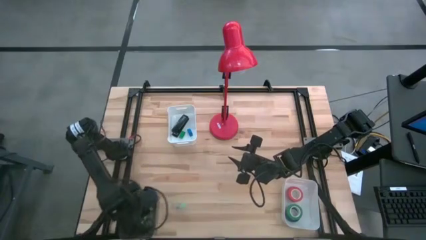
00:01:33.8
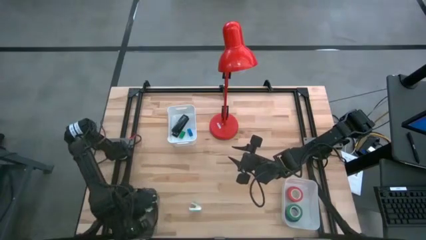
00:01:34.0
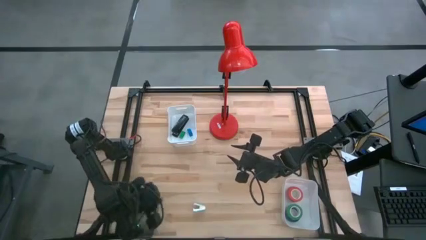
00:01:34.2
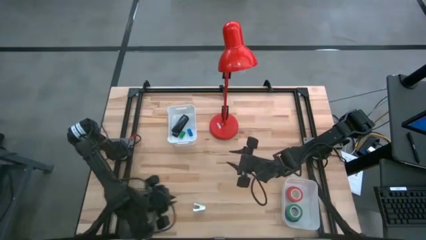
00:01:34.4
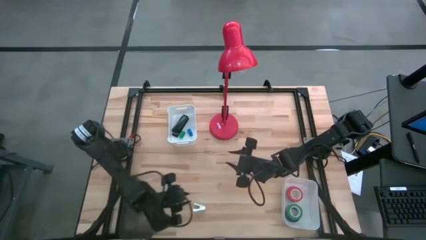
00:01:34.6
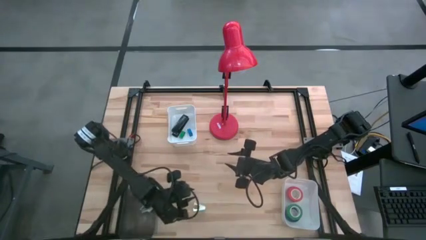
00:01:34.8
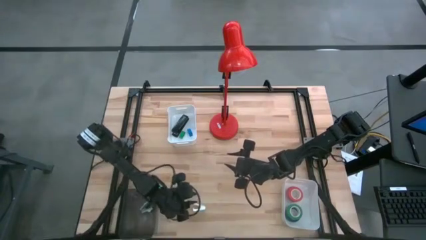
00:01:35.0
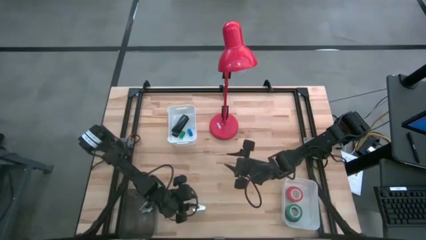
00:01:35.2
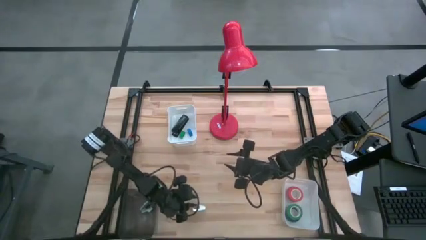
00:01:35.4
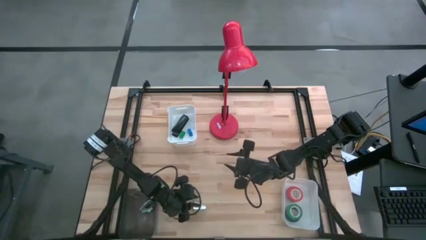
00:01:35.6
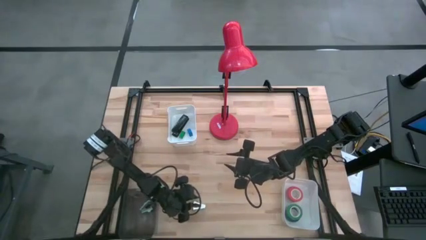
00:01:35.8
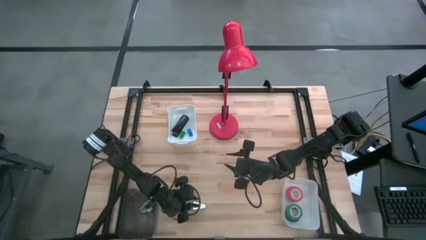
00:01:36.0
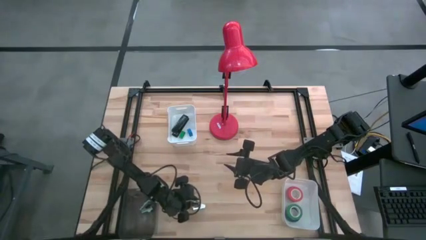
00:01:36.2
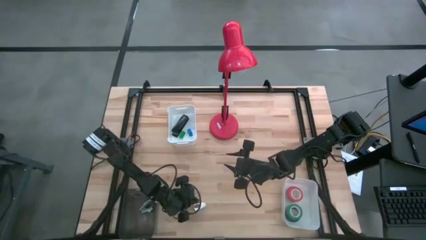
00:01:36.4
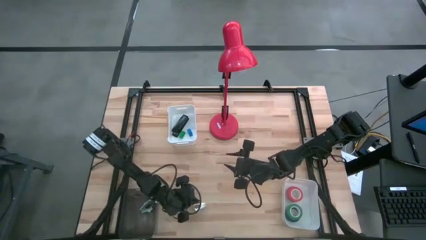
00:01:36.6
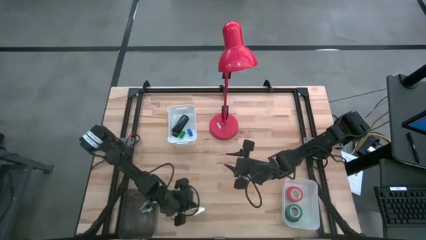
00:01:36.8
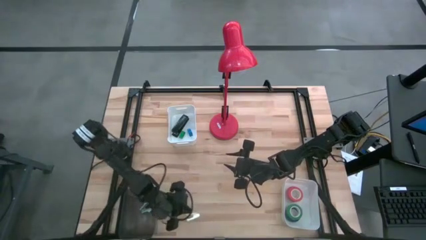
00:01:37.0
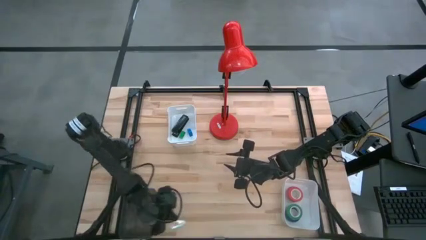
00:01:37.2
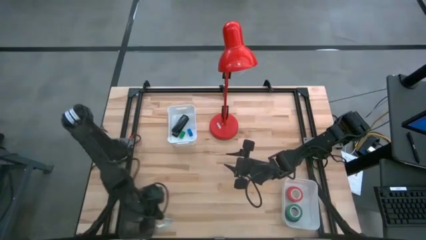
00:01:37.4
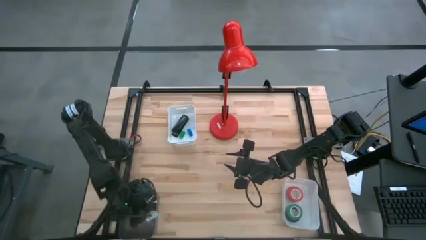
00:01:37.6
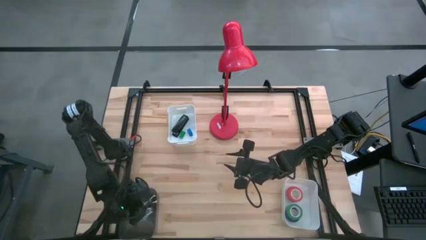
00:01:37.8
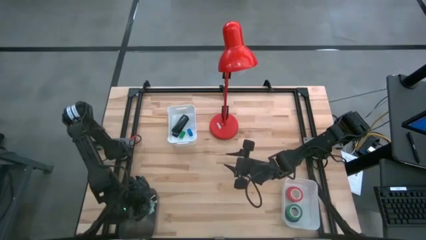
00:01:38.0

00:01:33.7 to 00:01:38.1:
Task: Pick and place Stapler, Stapler remover, tape
Put the blue staple remover into the black bin

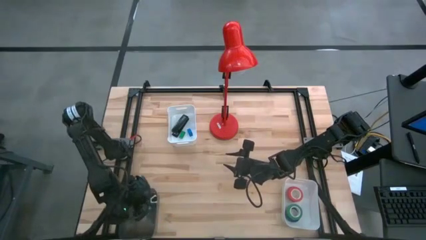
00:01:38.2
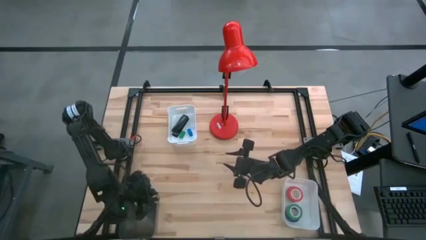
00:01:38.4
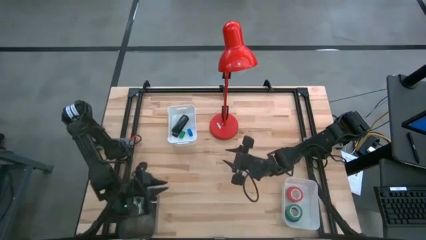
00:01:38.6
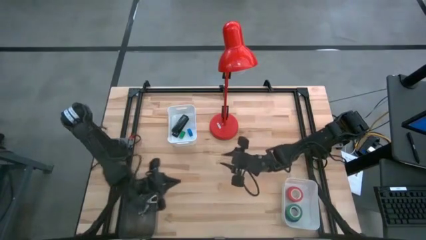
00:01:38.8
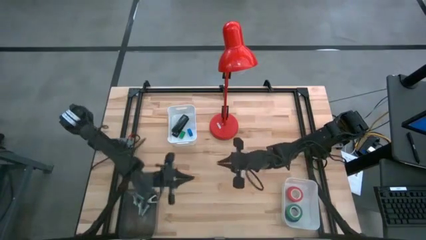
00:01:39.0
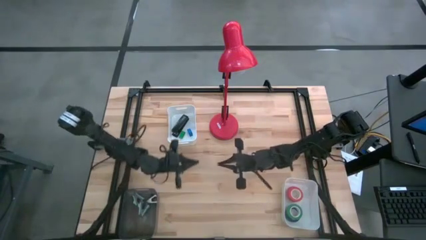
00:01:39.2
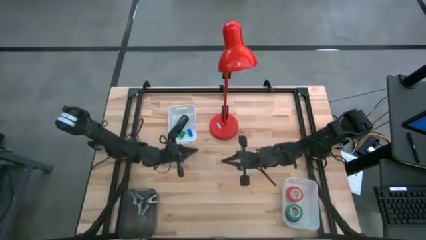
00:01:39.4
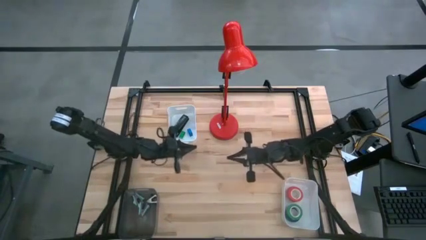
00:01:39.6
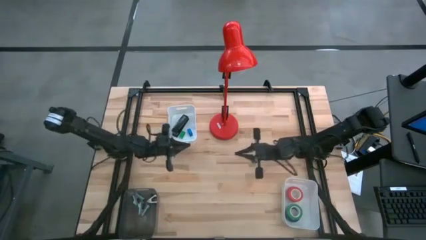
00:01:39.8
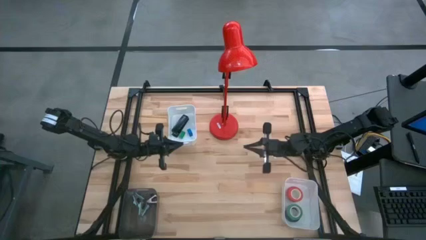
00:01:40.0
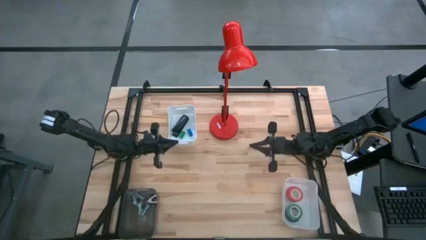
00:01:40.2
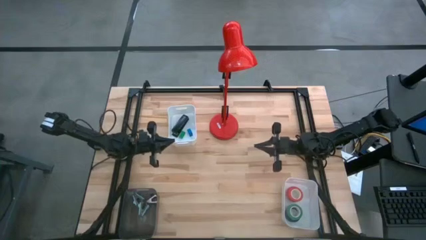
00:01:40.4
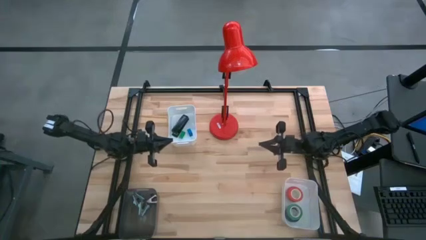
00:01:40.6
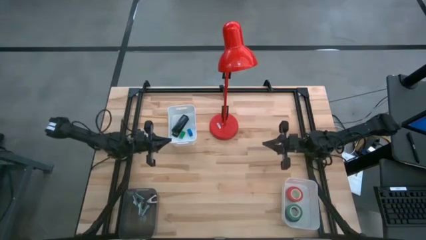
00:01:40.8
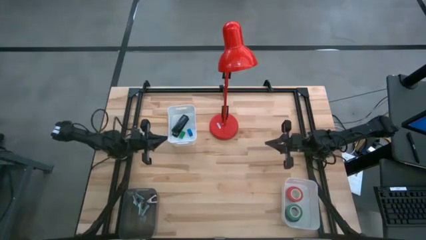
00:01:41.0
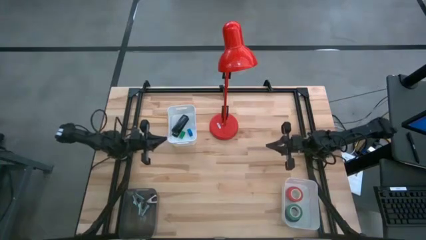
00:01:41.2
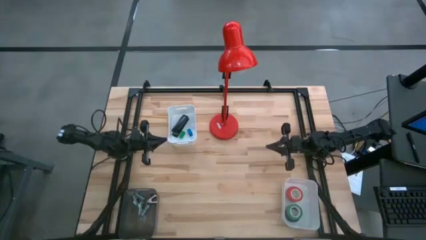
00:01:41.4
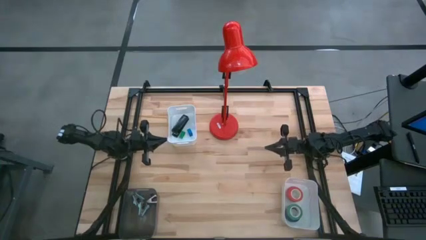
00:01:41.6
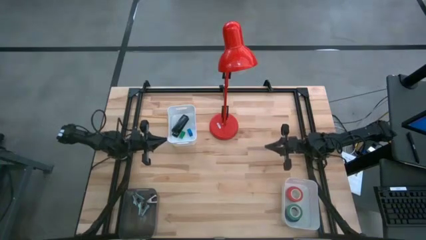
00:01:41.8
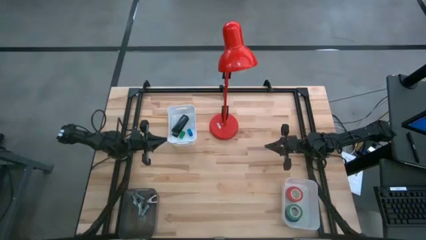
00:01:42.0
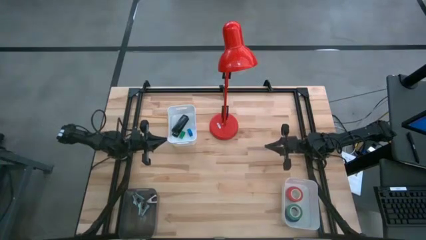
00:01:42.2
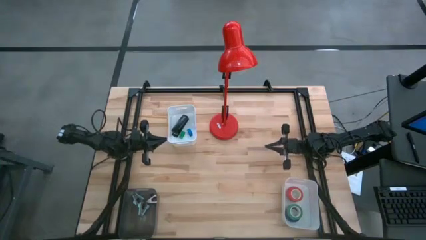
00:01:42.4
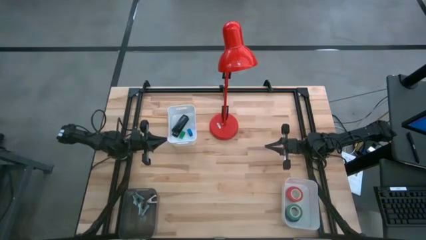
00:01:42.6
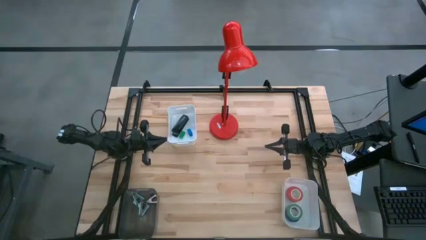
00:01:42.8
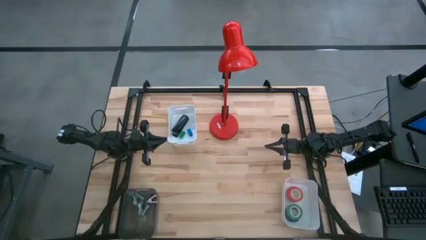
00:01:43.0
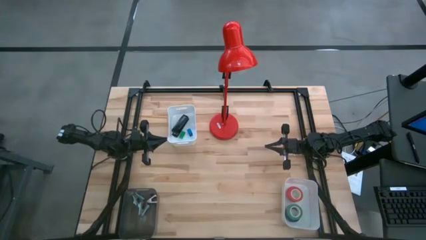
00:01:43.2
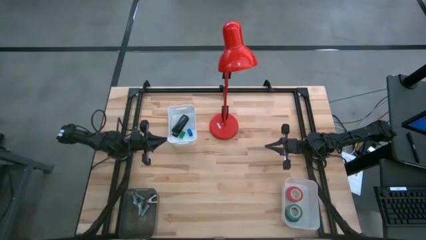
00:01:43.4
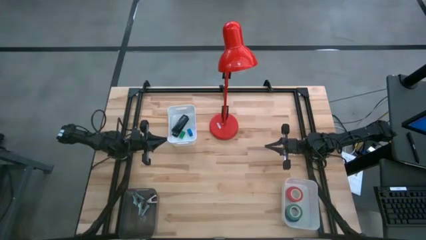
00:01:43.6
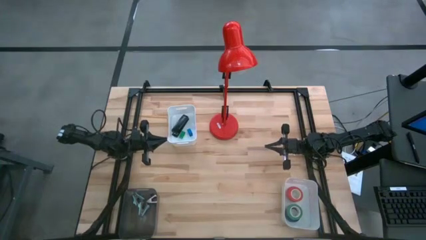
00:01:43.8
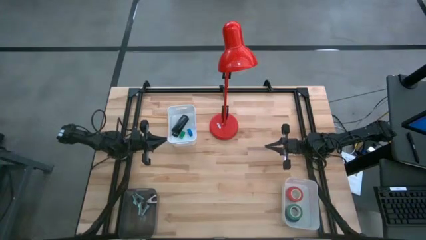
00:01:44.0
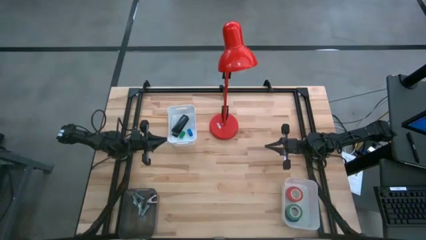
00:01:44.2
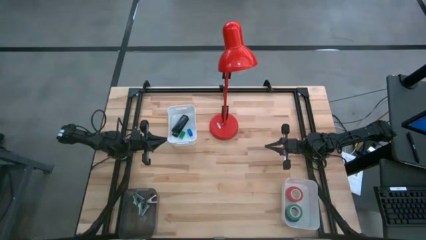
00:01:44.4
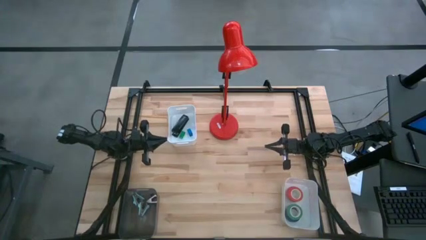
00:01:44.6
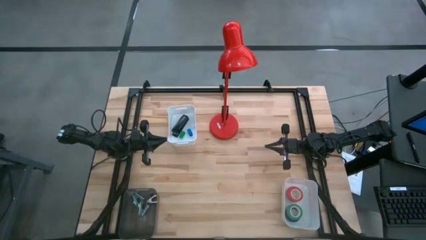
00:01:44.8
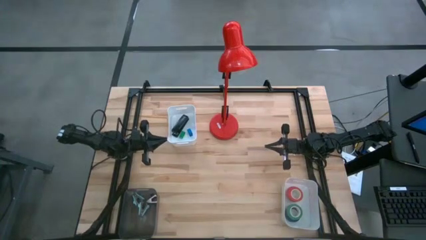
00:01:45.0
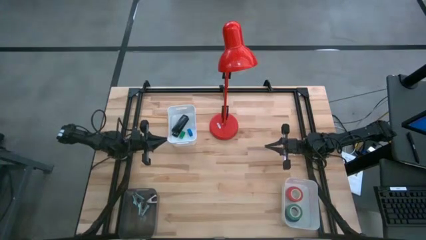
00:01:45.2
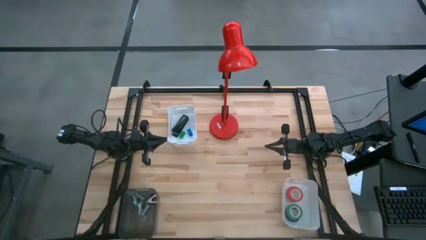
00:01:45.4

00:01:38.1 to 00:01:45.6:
Return to Home Position

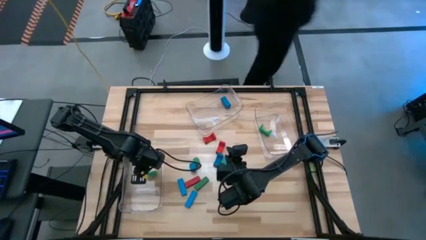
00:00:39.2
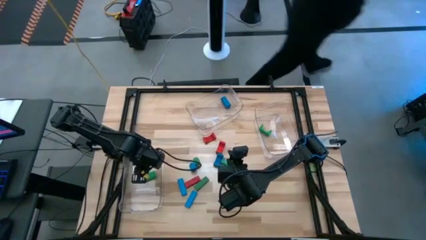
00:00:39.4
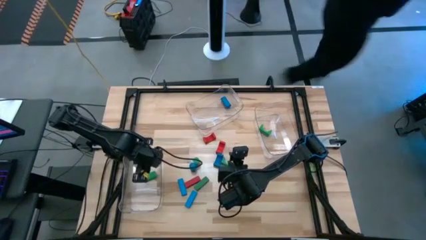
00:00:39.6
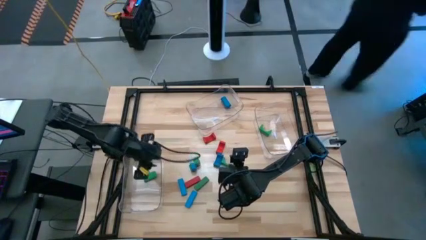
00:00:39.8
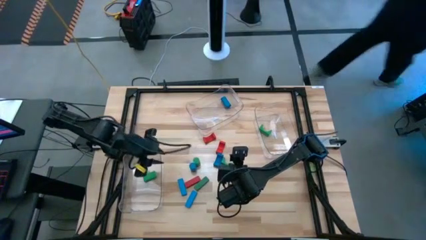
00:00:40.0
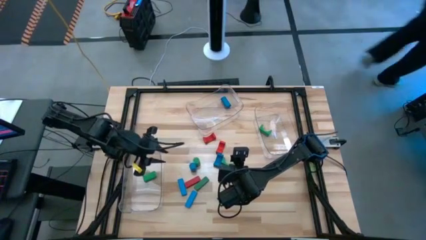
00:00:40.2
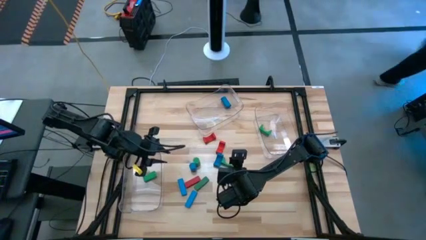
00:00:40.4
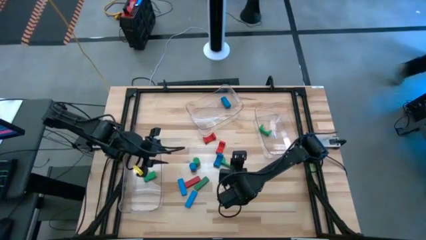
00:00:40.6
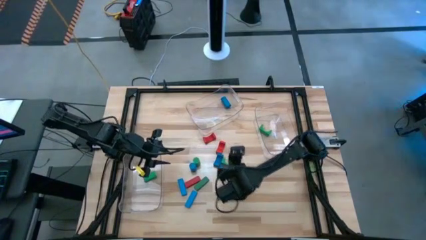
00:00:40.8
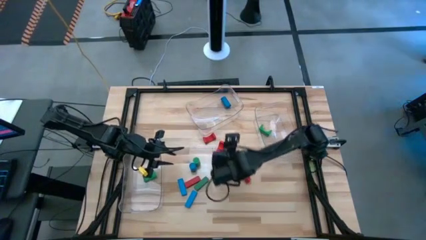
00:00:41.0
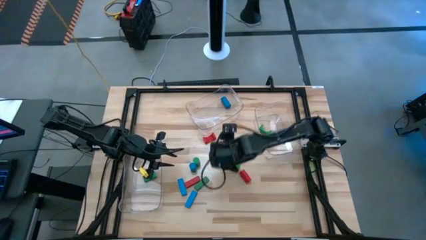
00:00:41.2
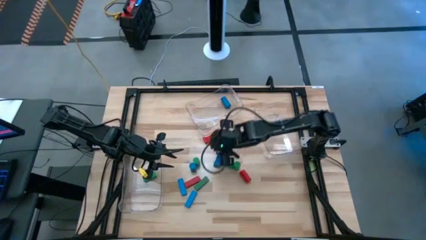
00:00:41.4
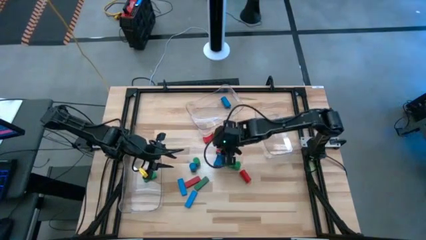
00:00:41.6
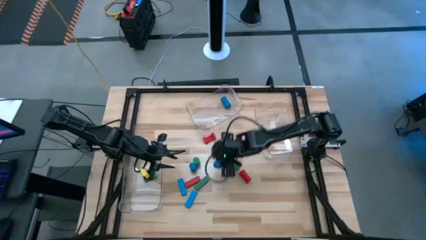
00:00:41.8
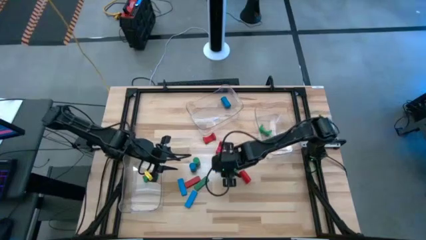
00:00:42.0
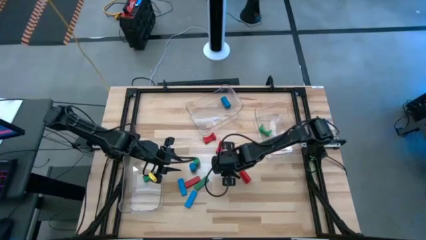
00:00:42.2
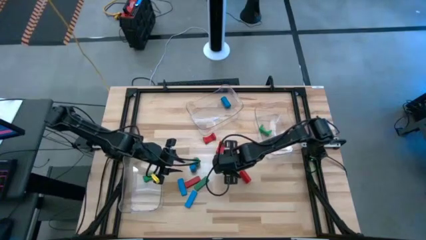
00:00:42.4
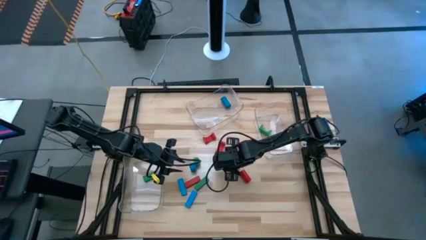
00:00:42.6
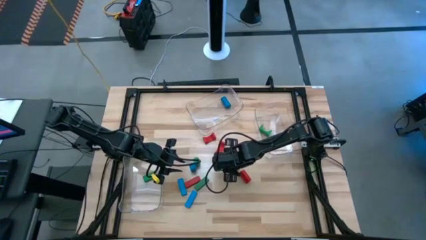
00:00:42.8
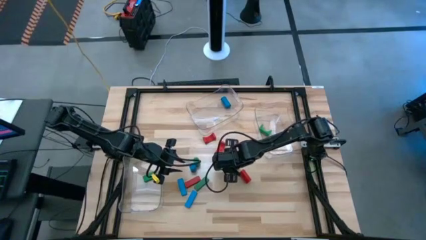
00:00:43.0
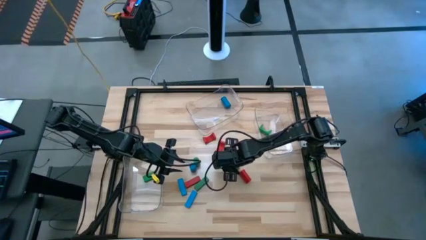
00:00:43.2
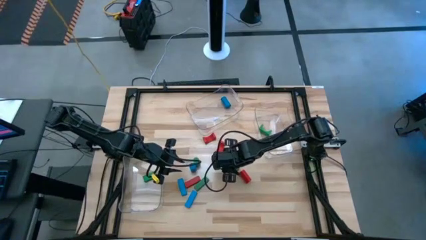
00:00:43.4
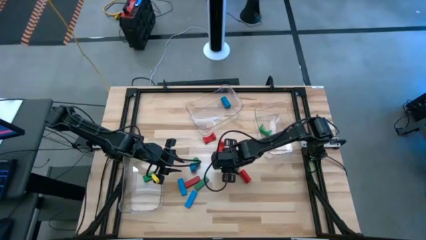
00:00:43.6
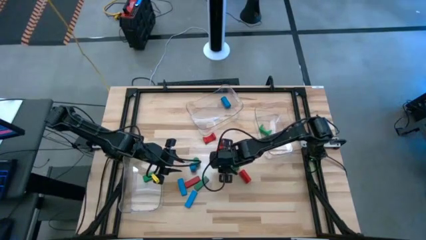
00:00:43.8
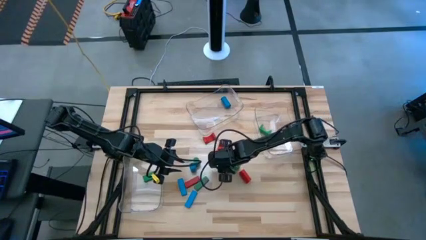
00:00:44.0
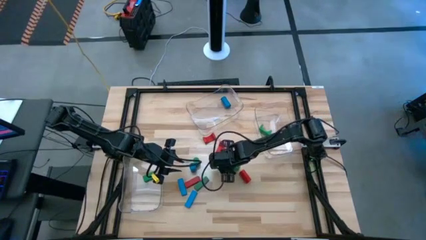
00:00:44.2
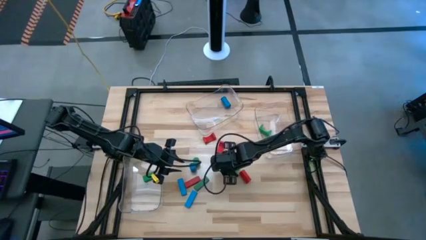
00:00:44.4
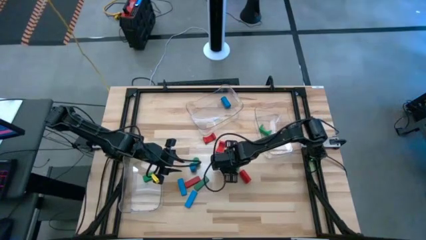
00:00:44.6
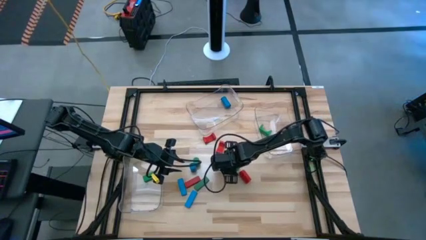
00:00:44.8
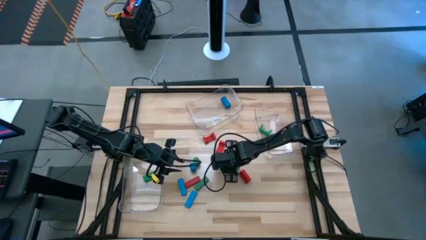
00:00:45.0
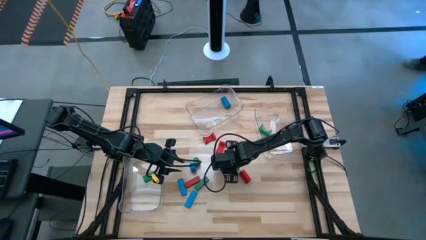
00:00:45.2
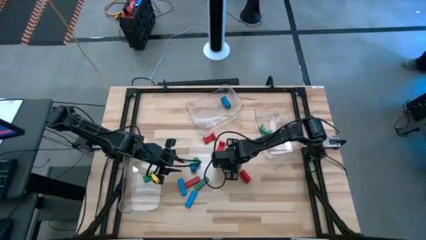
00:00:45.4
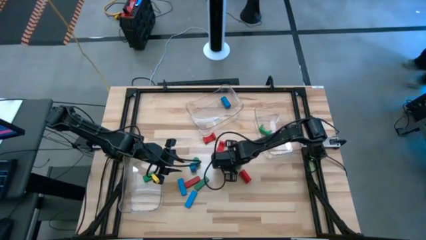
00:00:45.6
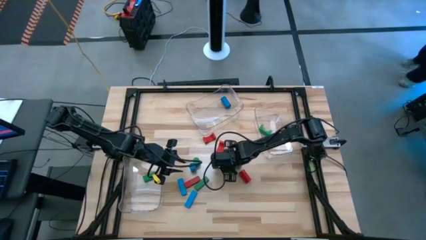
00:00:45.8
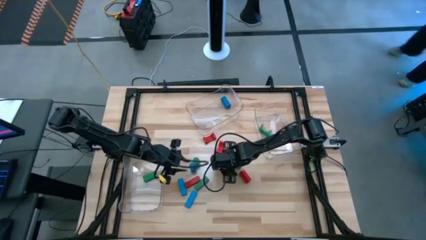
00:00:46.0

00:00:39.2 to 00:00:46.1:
Task: Sort blocks by size
Put the green arch block into the right transparent bin
